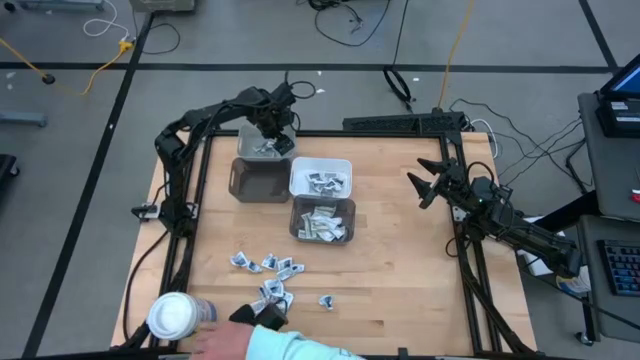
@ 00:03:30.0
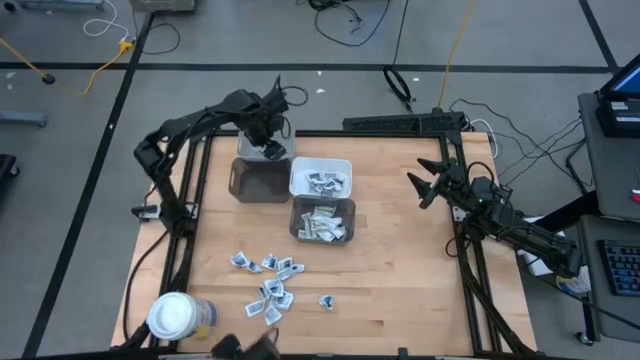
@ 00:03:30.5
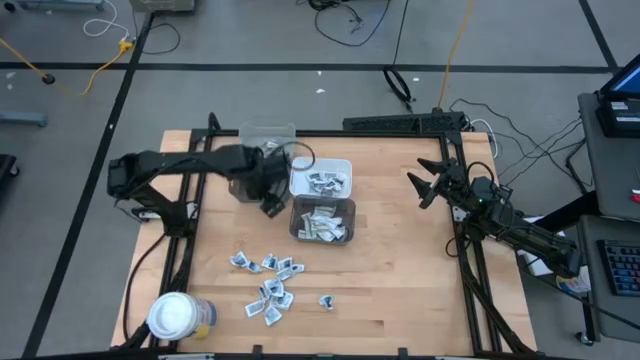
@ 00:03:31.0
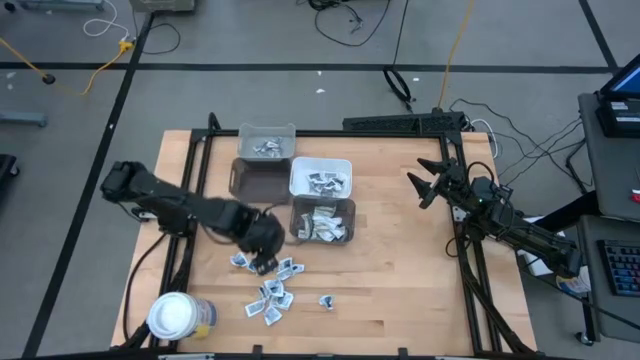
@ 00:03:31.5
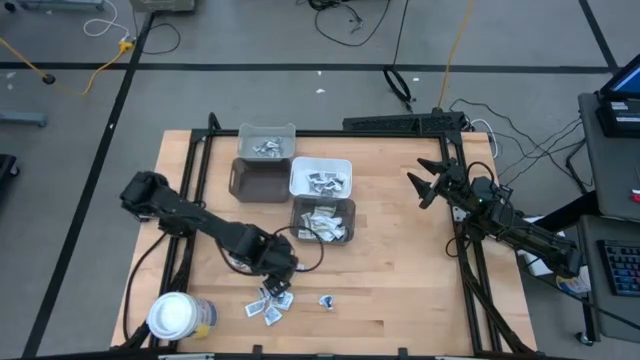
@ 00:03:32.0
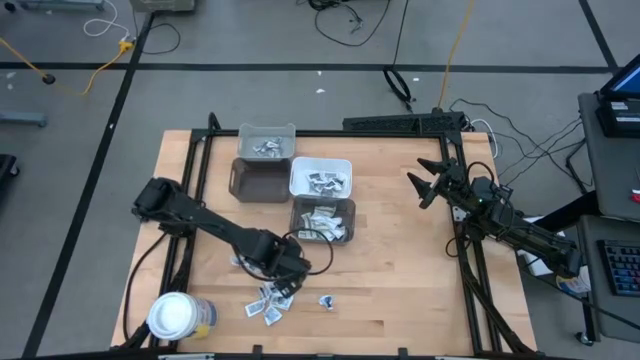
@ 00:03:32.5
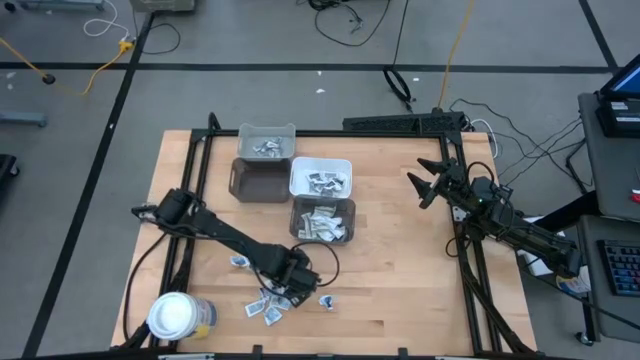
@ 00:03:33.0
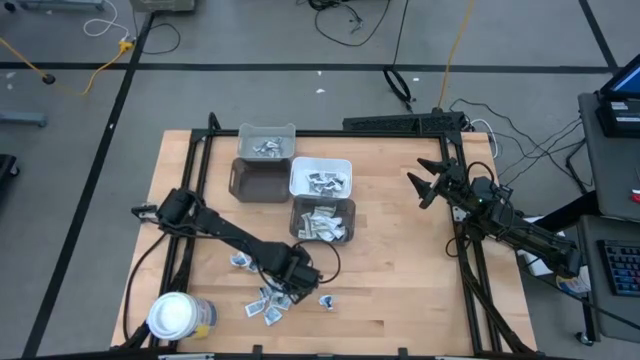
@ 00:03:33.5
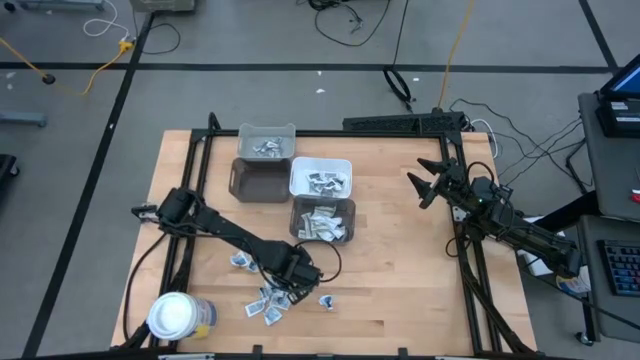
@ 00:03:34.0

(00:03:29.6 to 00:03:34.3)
Task: Pick & Place First Aid Supplies
Put the orange ointment pack into the gray bin

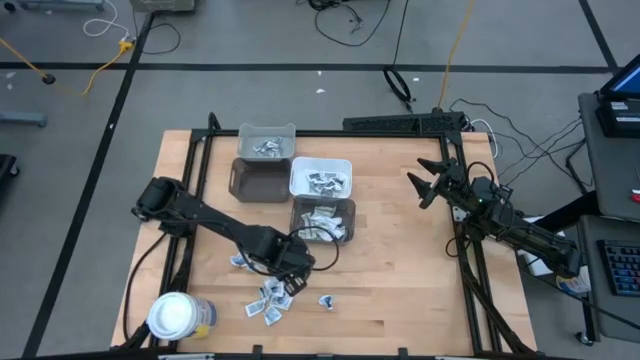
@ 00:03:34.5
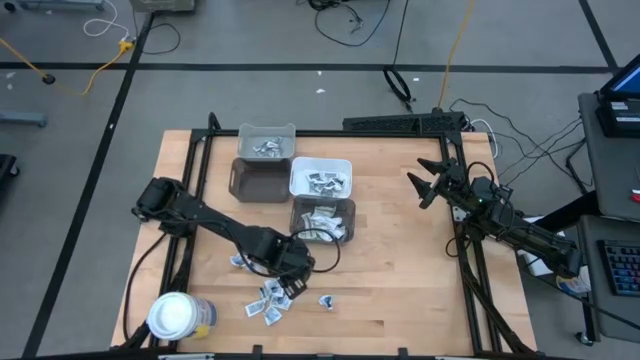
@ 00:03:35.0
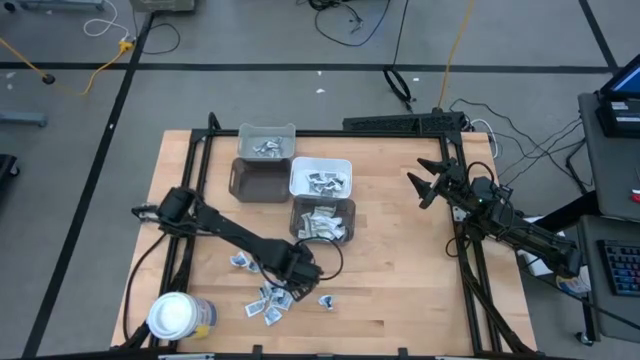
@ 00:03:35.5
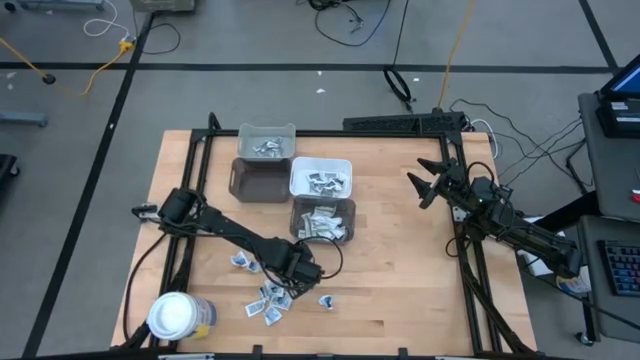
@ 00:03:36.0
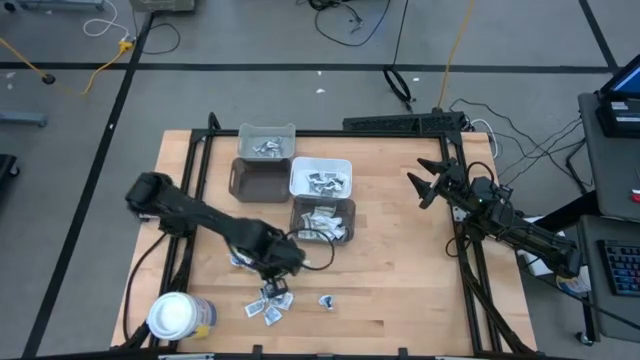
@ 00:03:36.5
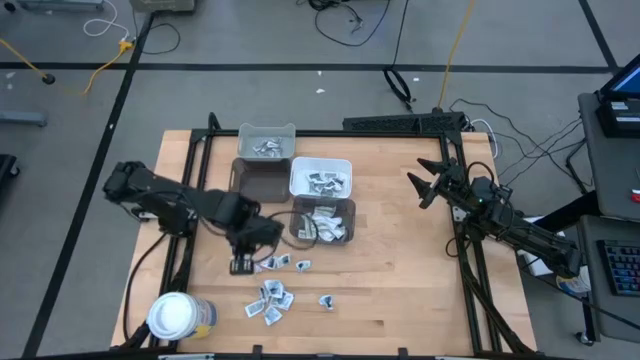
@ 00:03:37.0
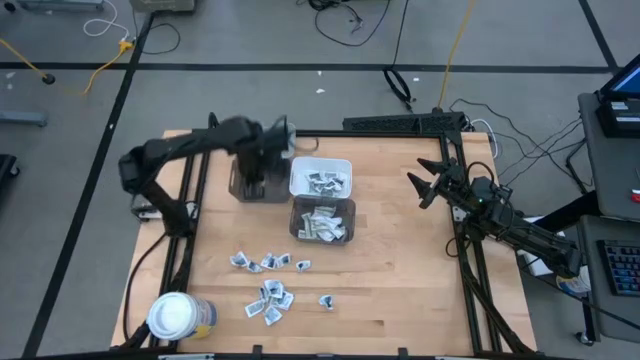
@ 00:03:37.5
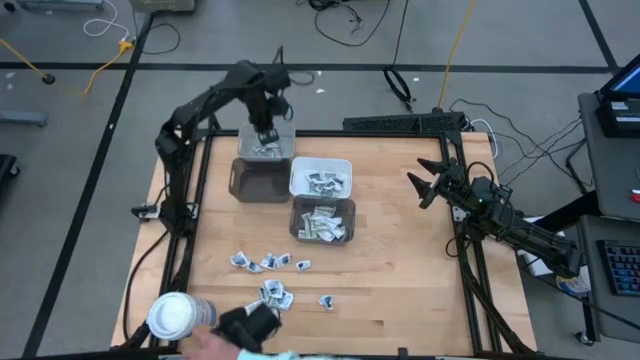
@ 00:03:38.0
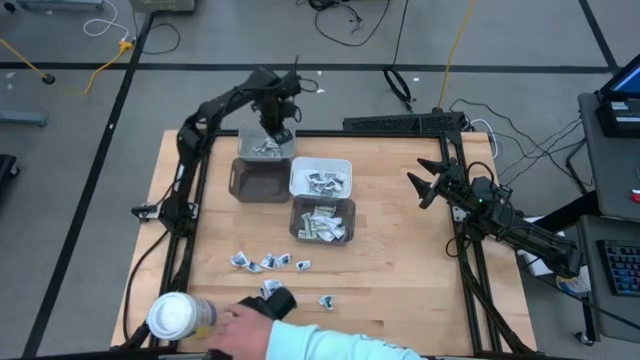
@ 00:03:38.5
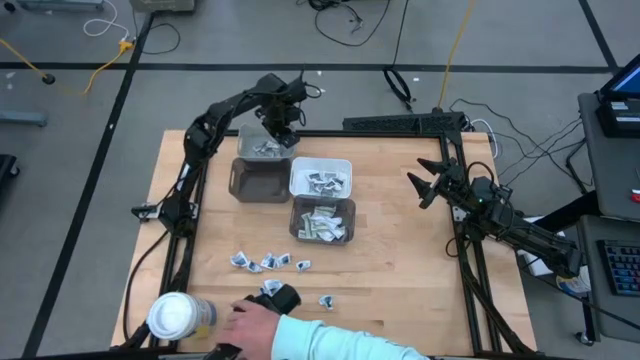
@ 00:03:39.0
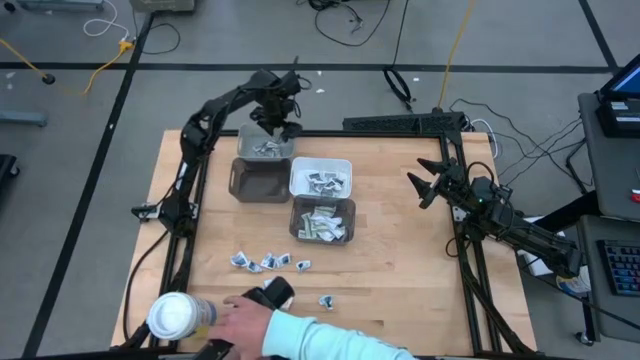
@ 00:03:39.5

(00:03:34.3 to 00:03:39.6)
Put the orange ointment pack into the gray bin

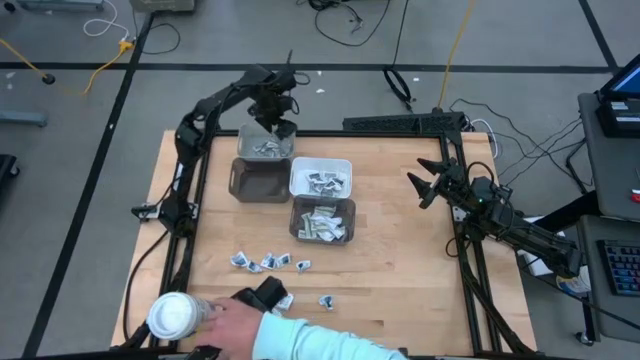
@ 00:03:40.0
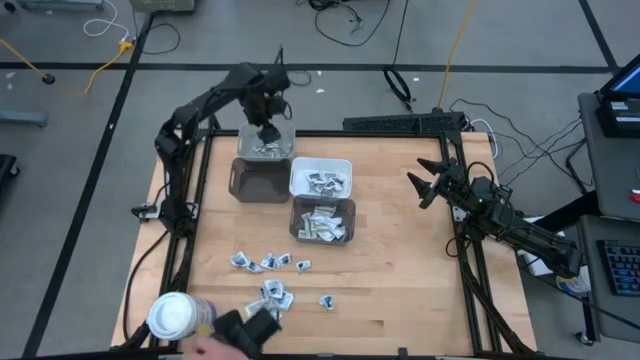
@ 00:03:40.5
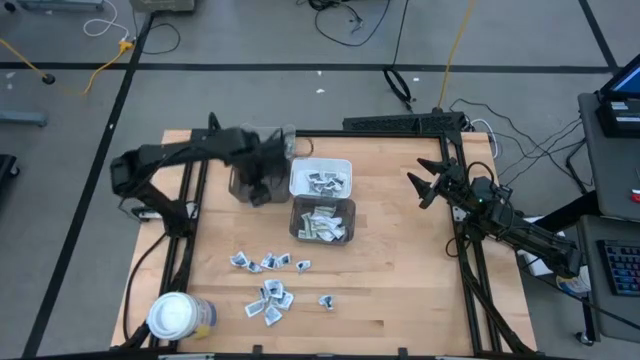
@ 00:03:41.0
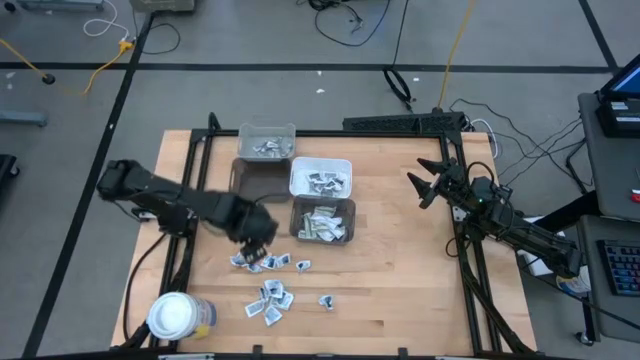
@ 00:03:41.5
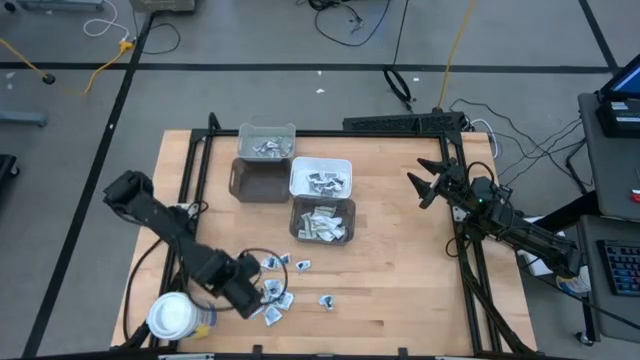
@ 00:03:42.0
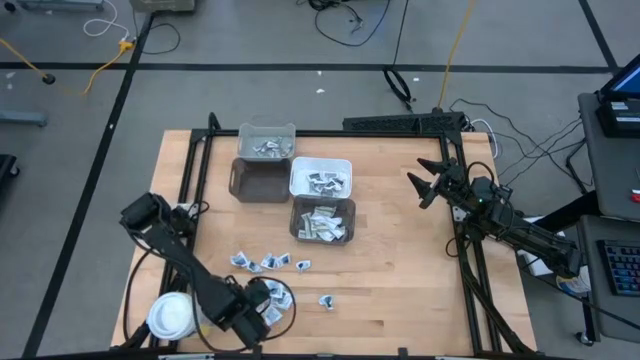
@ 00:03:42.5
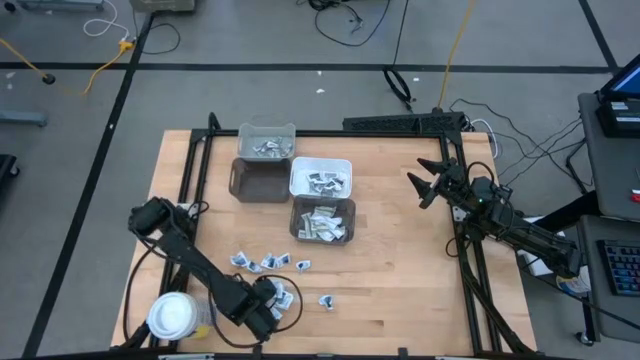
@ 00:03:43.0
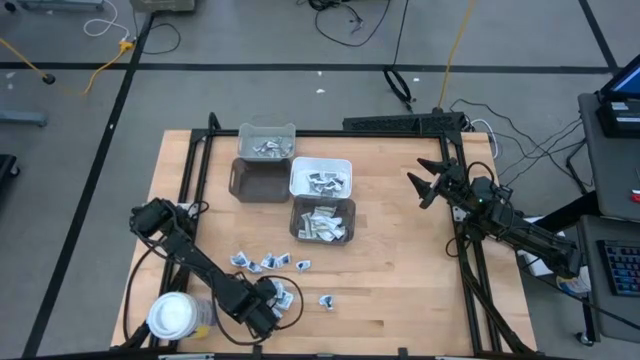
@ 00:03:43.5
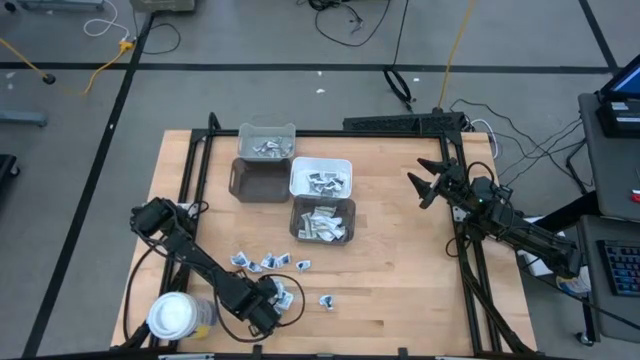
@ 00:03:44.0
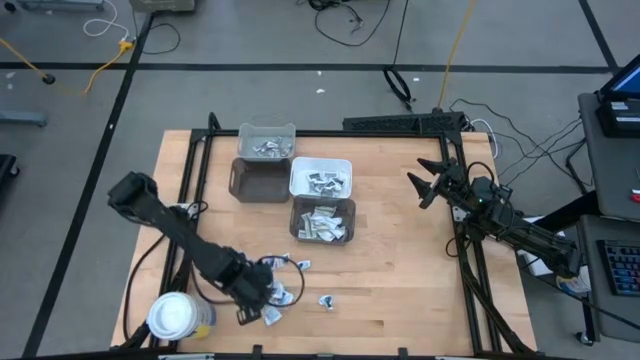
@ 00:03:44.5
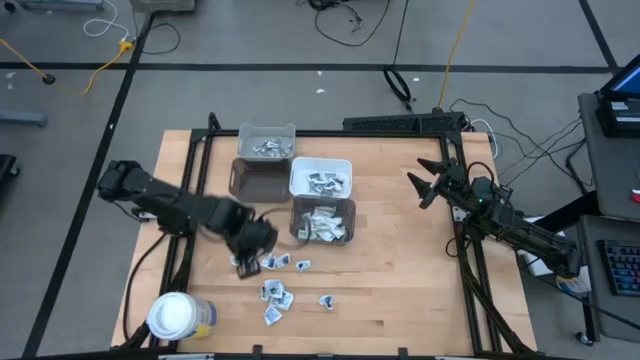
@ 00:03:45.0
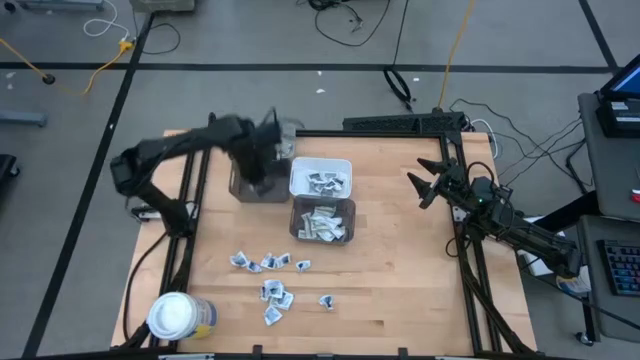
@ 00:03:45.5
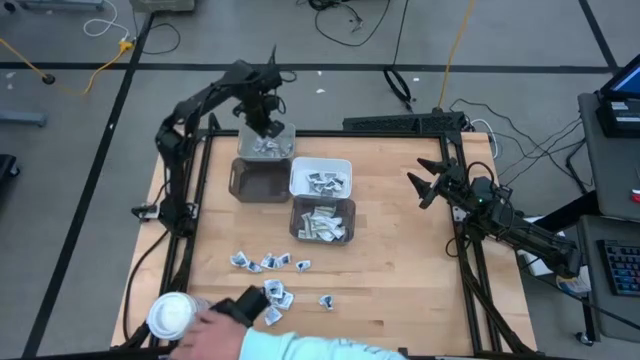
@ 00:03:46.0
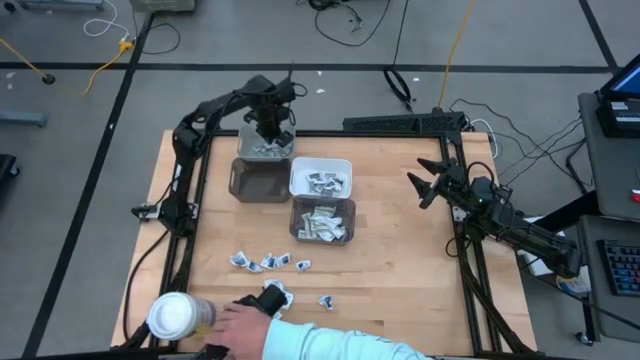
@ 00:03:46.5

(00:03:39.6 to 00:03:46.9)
Put the orange ointment pack into the gray bin
